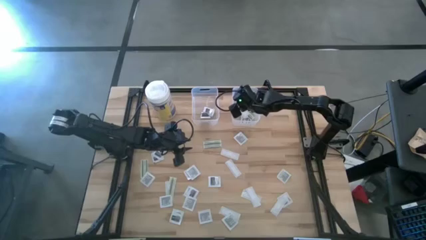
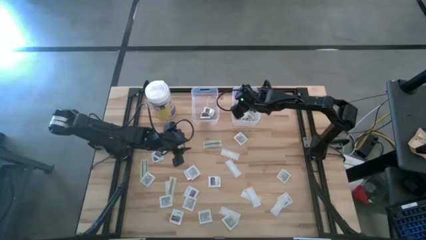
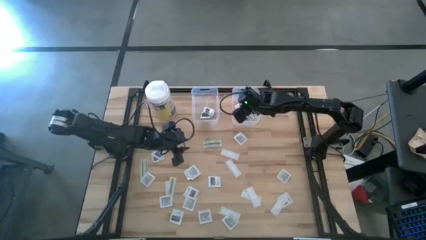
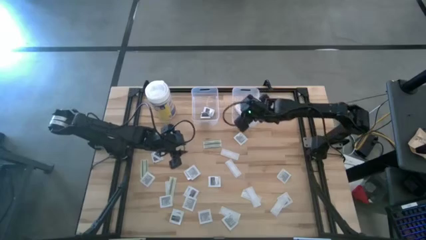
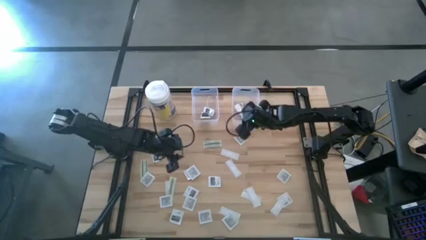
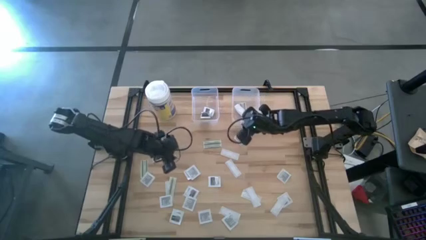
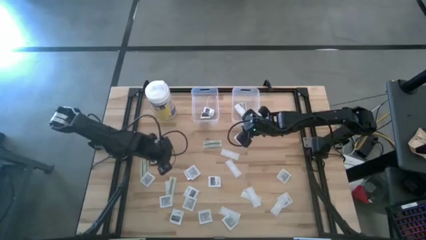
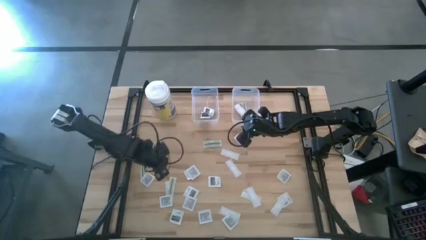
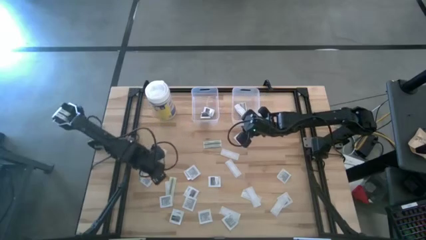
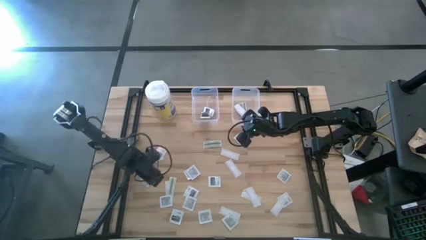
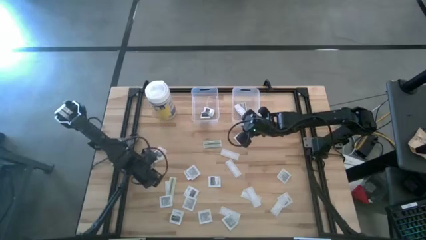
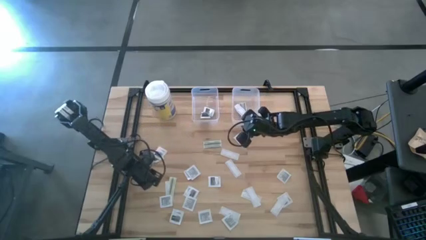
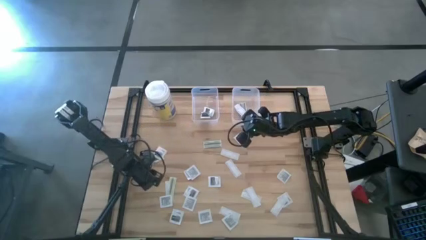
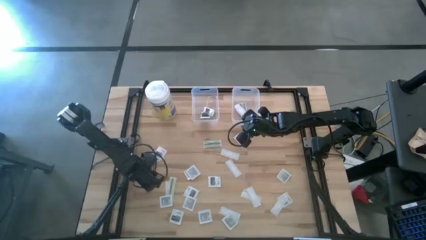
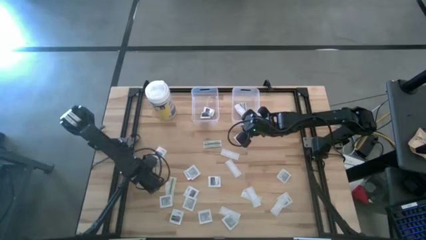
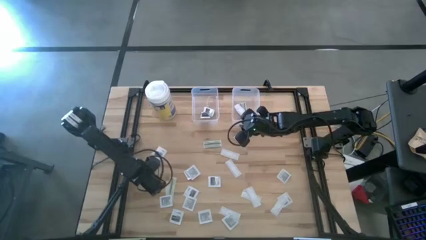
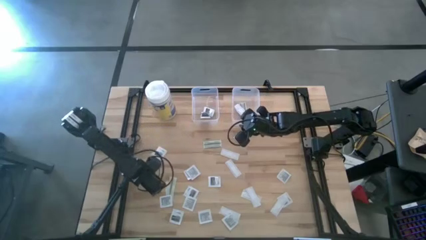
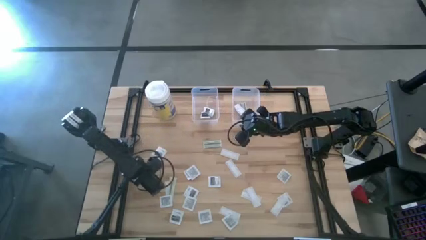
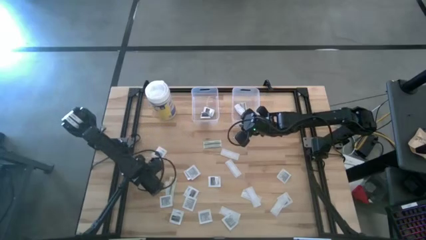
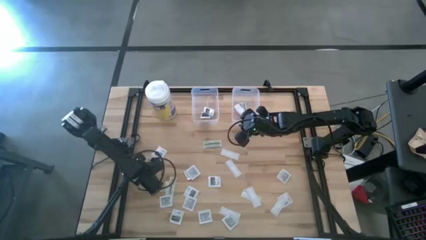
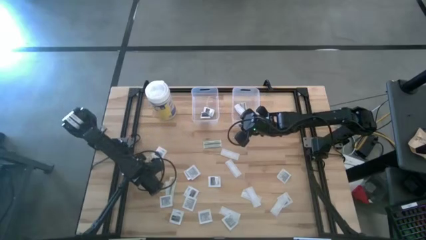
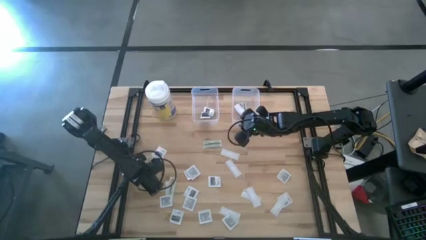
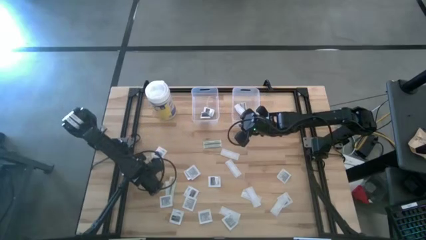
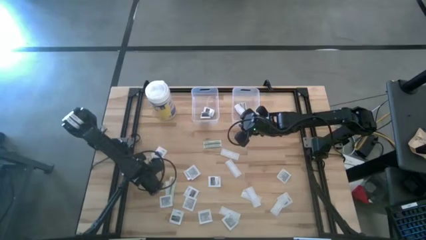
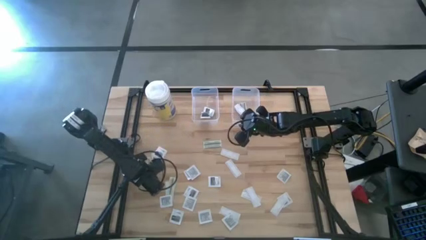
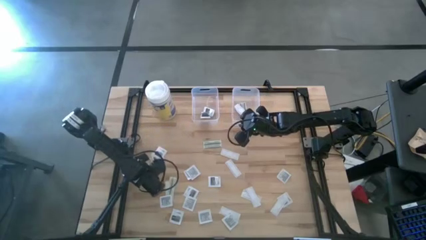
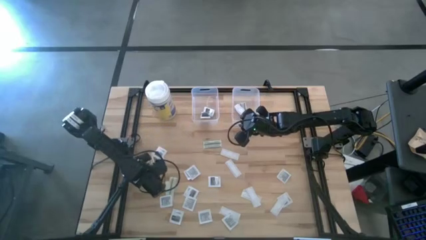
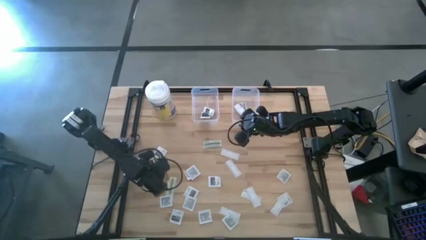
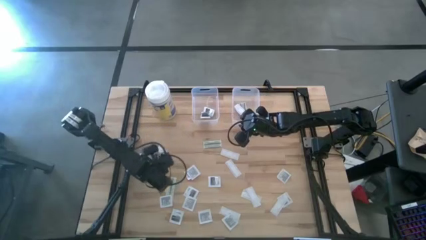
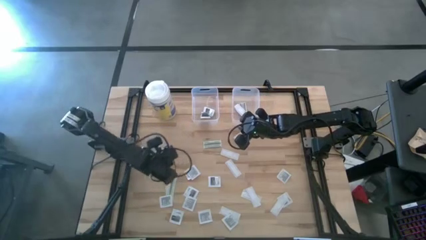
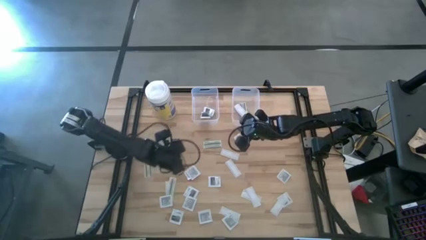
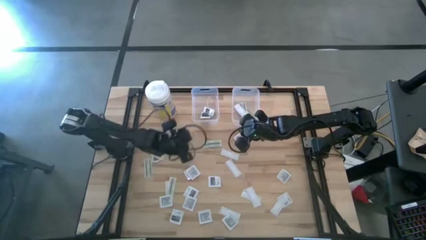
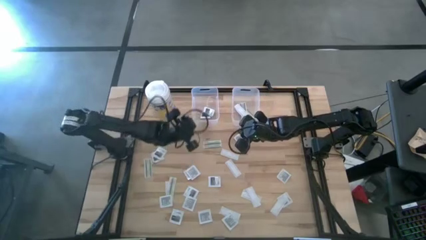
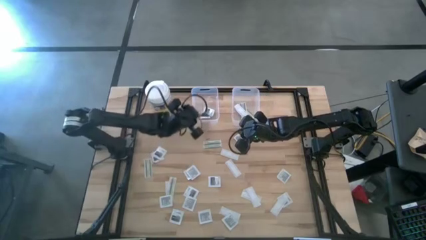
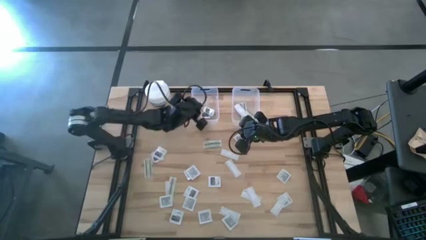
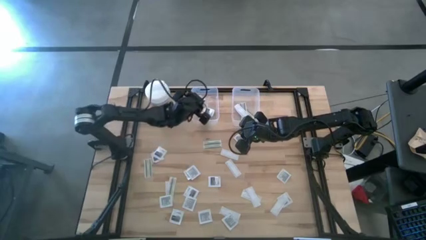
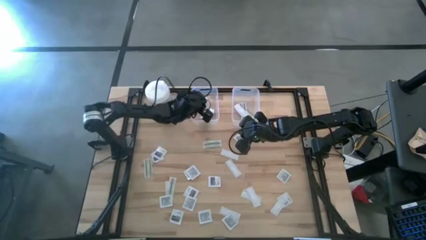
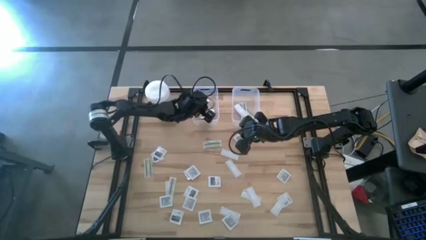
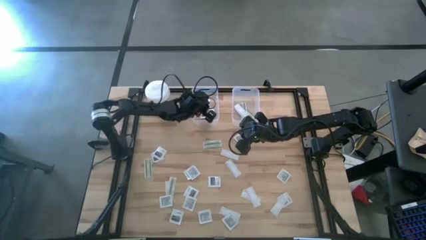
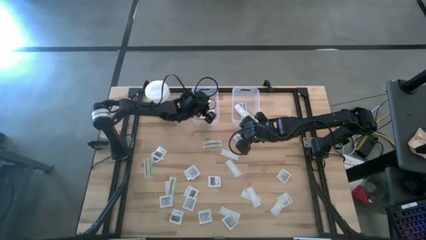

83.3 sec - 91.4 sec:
Task: Pick & Place First Aid Supplies
Put the towelette pack into the left transparent bin

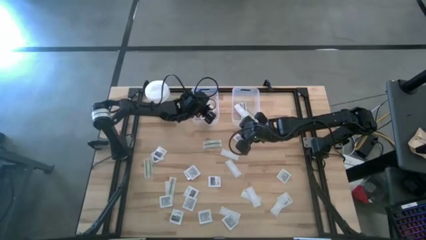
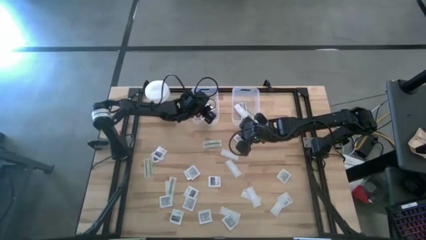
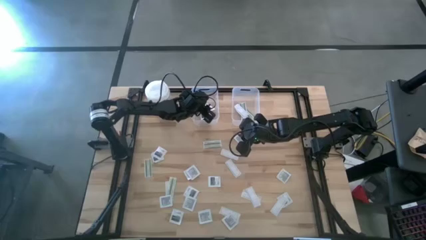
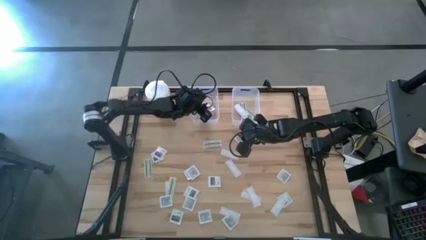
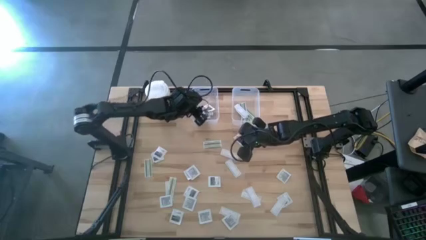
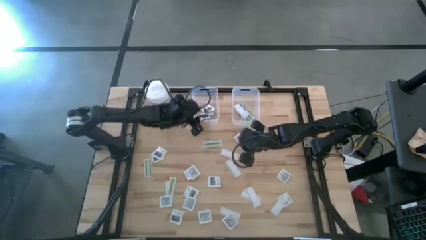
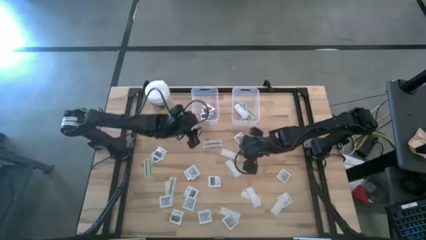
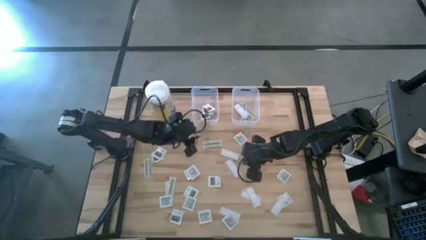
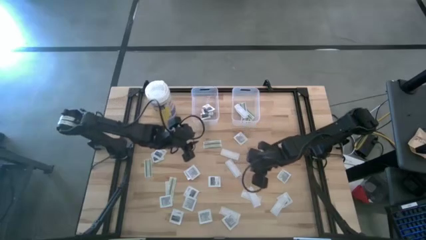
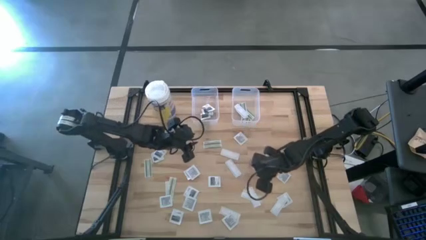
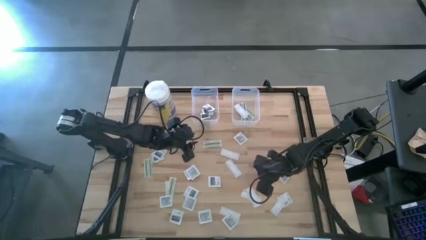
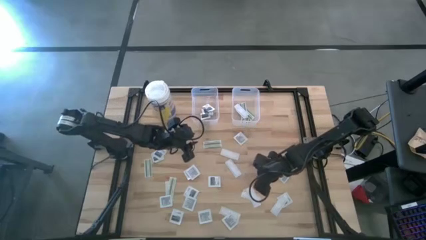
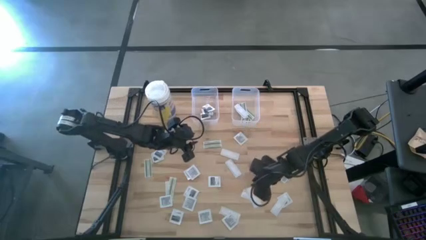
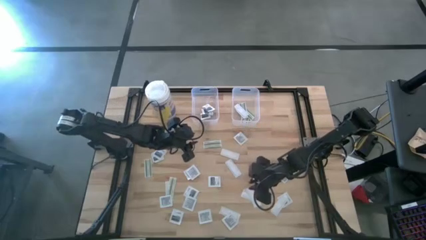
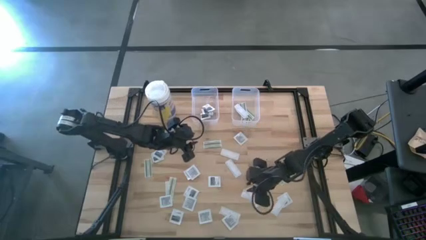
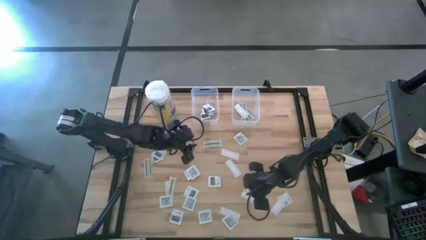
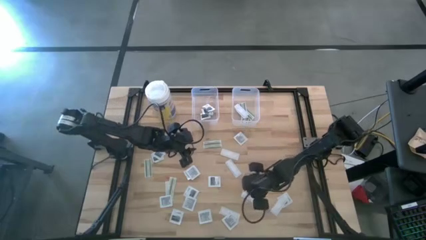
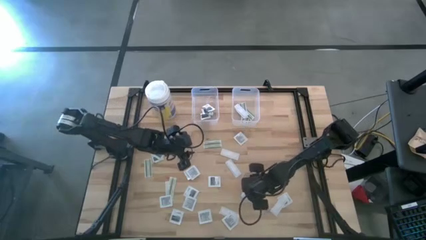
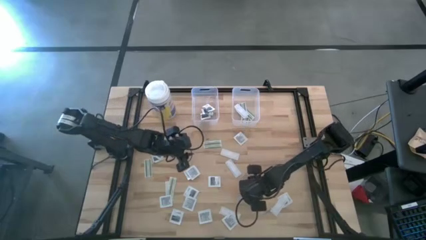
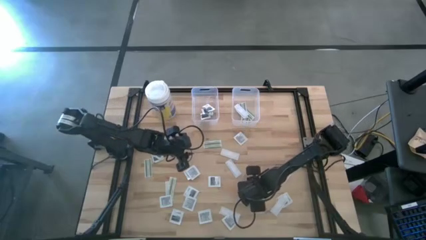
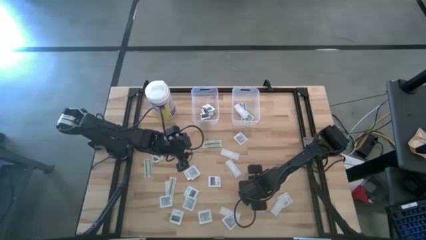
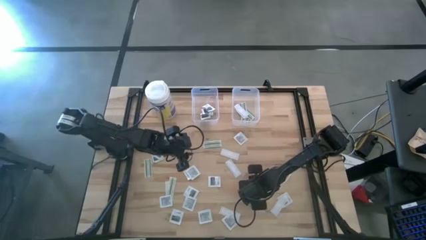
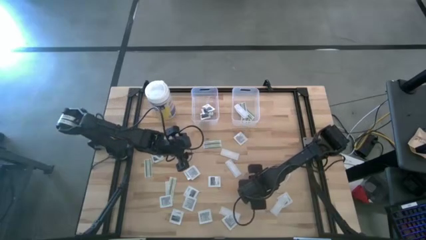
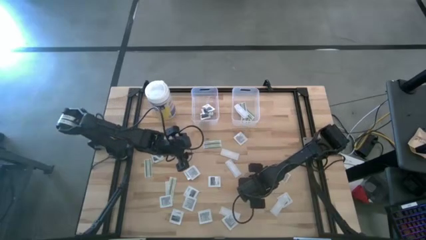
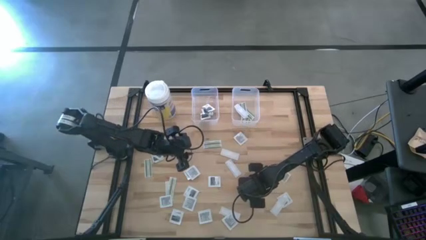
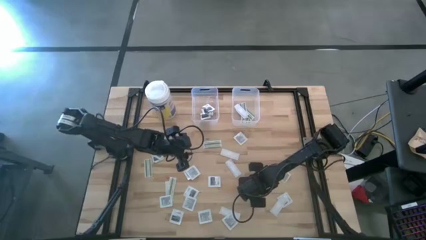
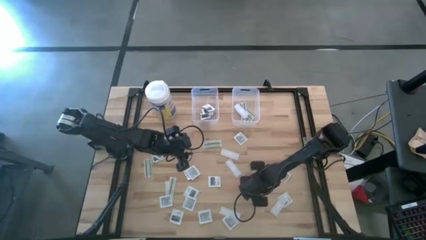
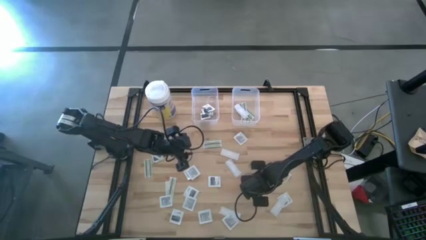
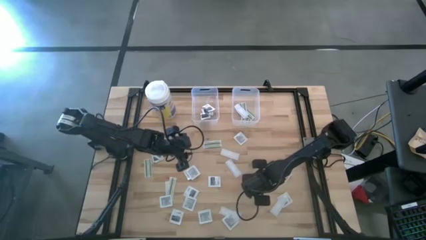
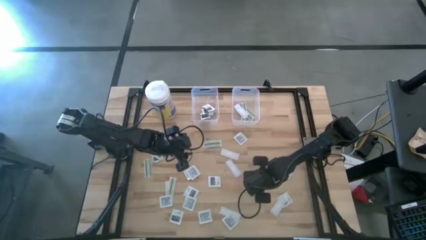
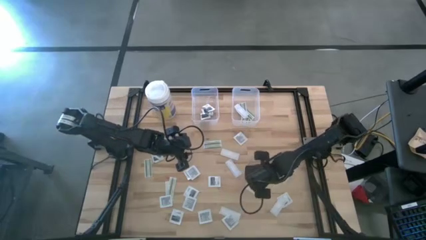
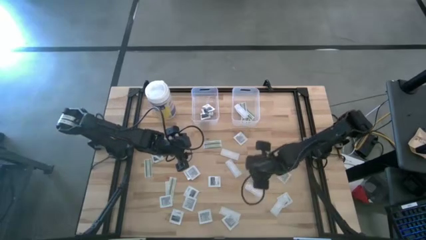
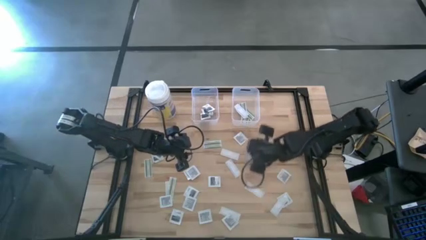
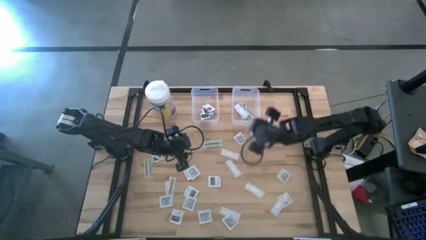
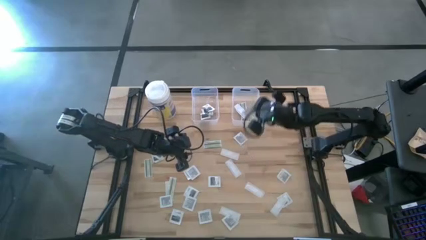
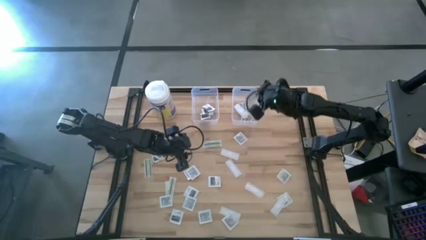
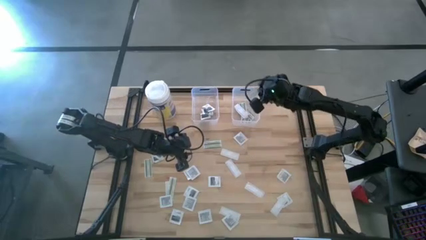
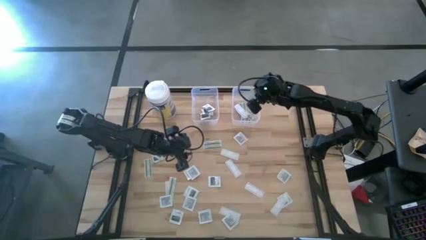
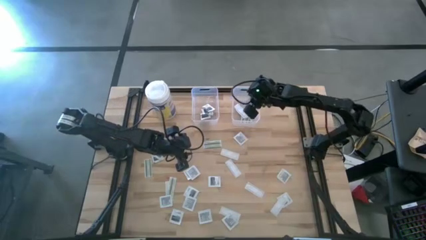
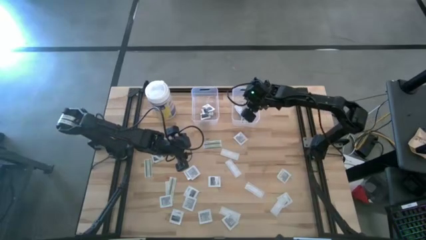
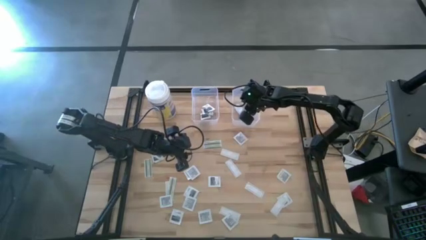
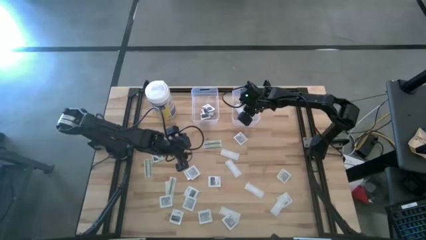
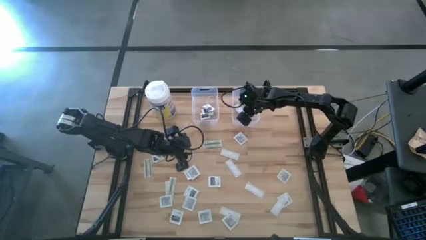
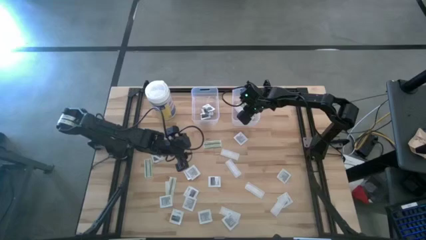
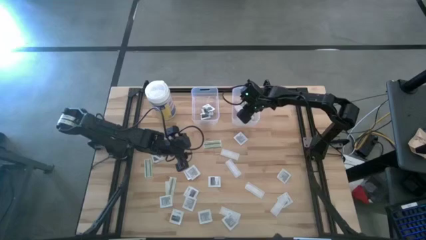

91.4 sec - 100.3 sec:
Put the bandage into the right transparent bin
